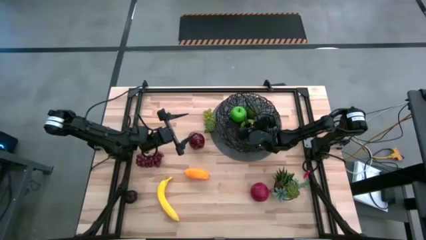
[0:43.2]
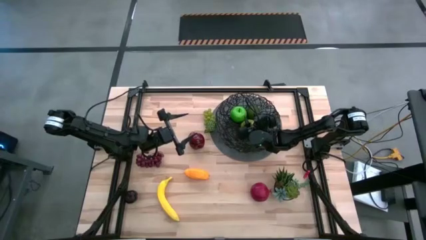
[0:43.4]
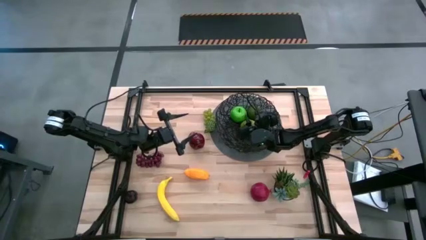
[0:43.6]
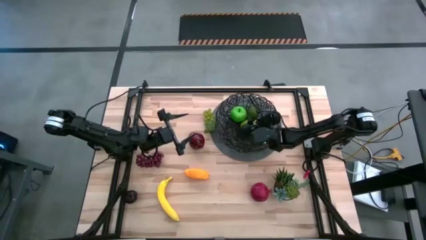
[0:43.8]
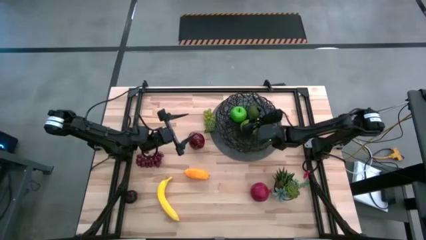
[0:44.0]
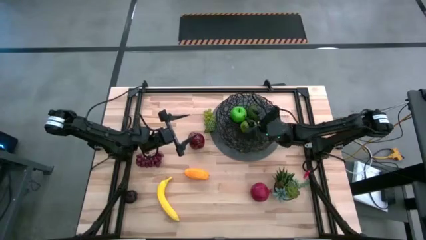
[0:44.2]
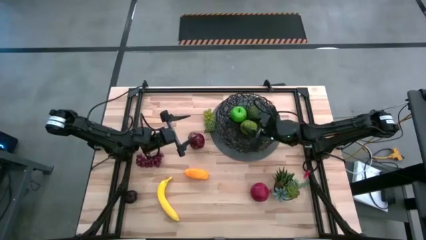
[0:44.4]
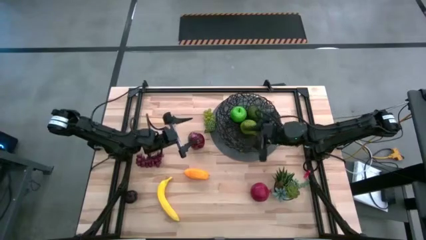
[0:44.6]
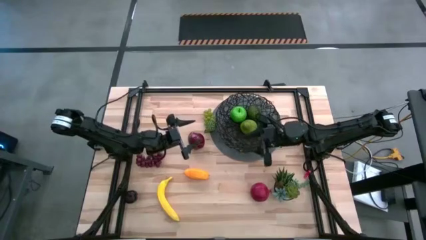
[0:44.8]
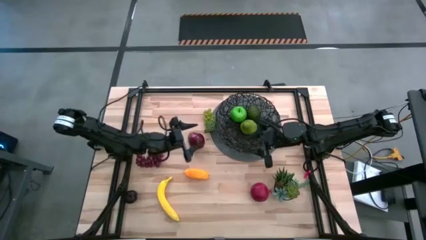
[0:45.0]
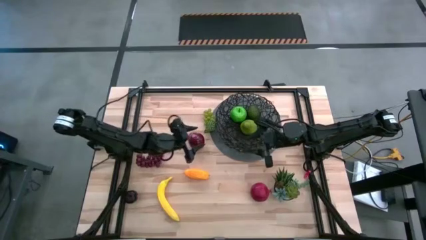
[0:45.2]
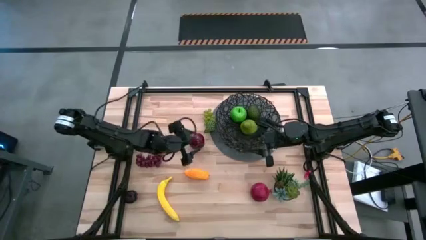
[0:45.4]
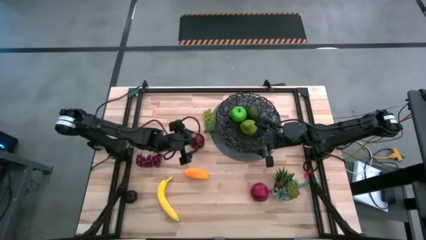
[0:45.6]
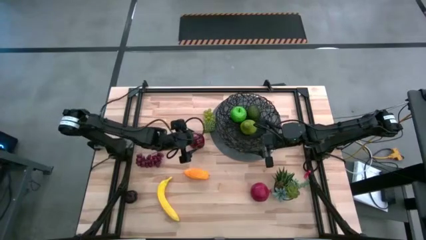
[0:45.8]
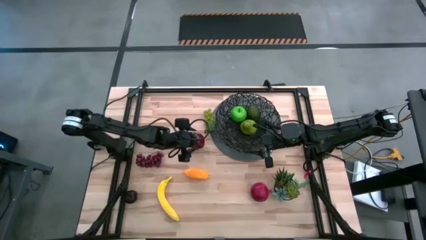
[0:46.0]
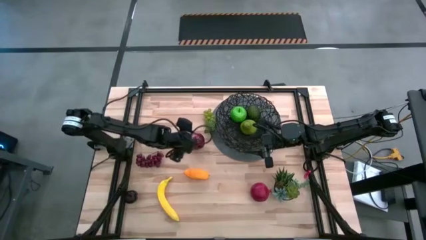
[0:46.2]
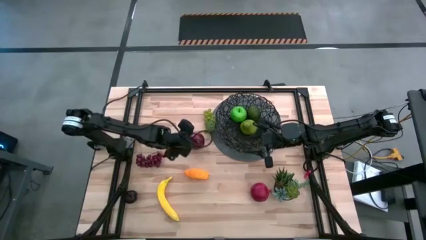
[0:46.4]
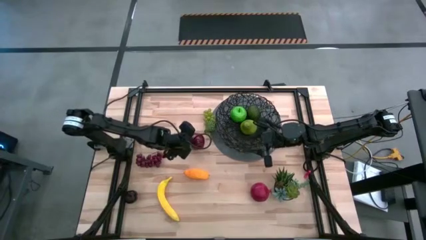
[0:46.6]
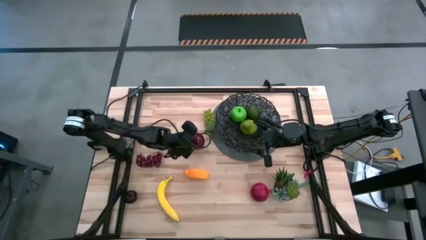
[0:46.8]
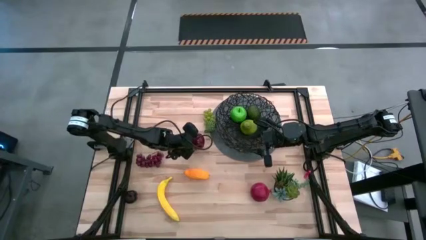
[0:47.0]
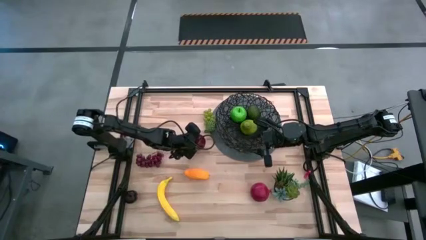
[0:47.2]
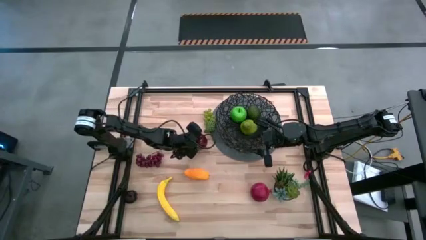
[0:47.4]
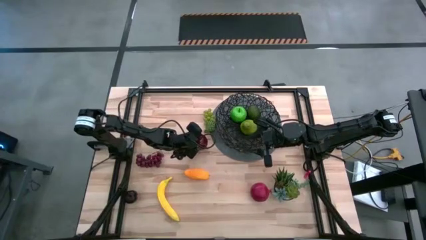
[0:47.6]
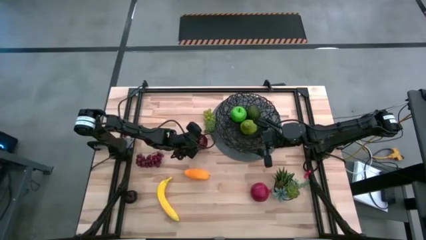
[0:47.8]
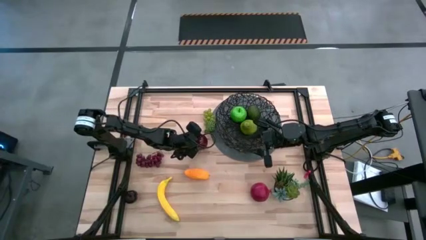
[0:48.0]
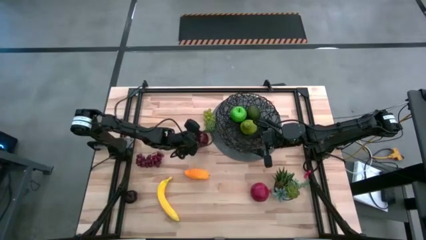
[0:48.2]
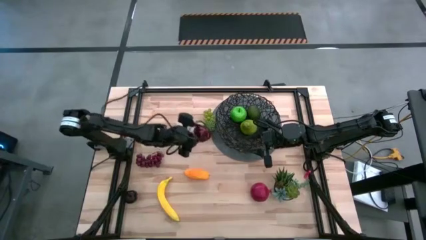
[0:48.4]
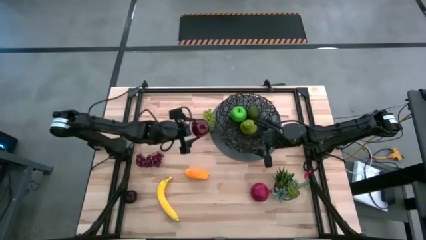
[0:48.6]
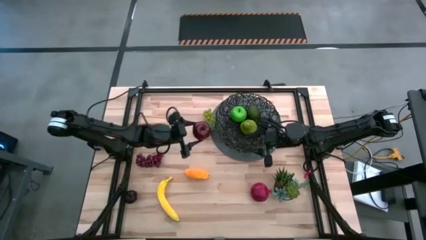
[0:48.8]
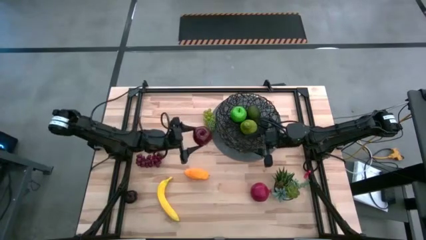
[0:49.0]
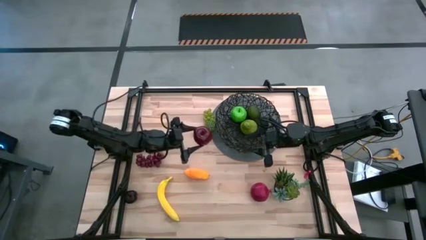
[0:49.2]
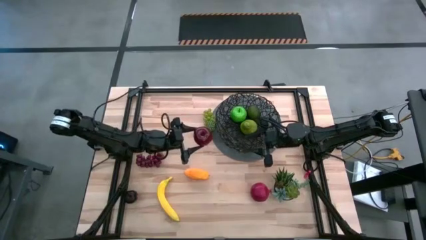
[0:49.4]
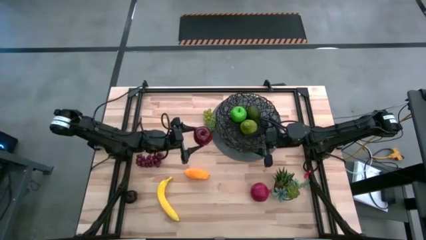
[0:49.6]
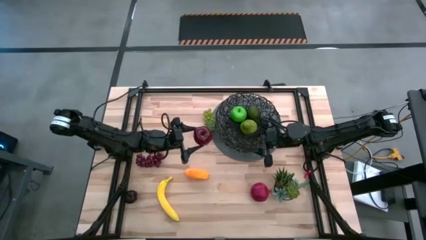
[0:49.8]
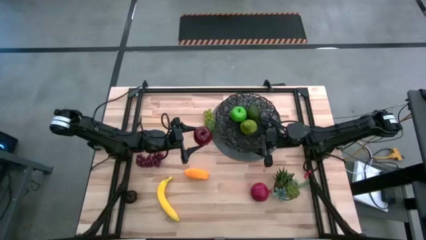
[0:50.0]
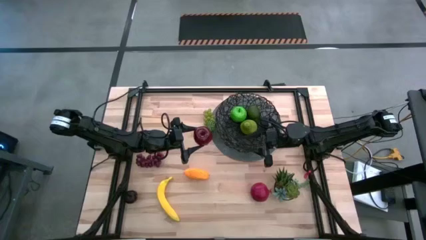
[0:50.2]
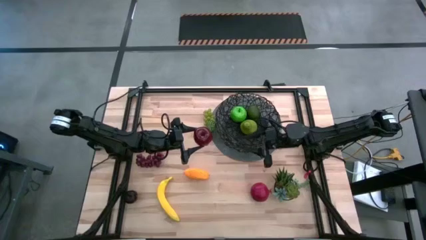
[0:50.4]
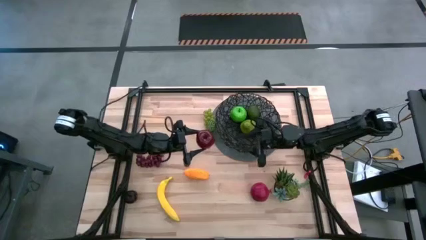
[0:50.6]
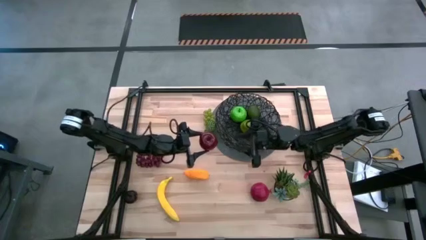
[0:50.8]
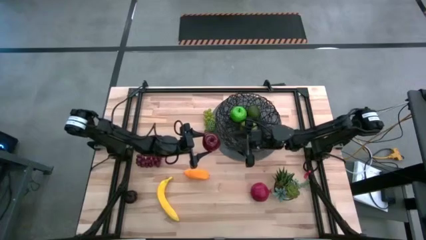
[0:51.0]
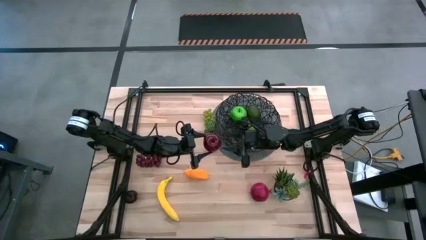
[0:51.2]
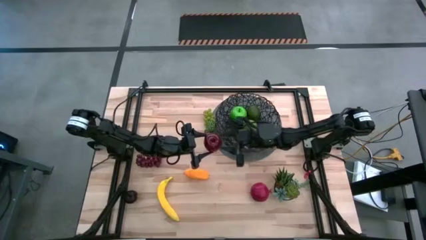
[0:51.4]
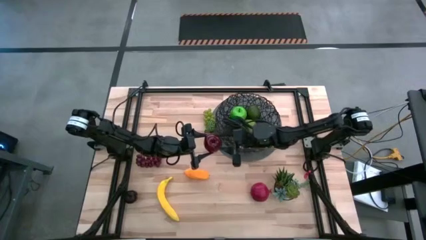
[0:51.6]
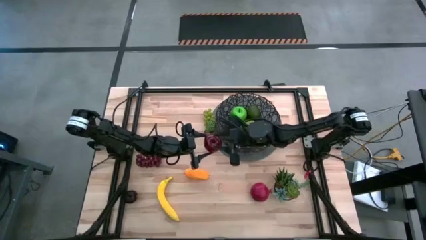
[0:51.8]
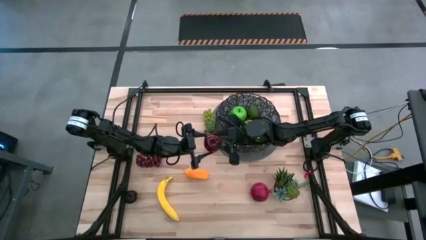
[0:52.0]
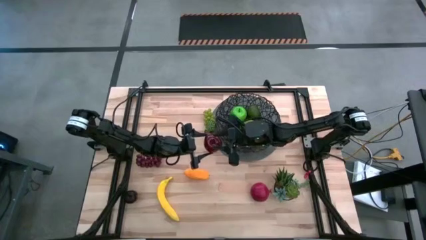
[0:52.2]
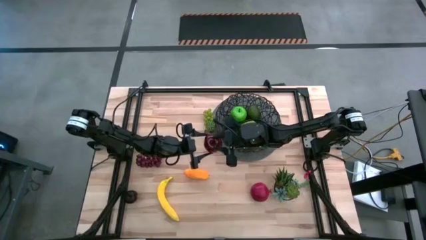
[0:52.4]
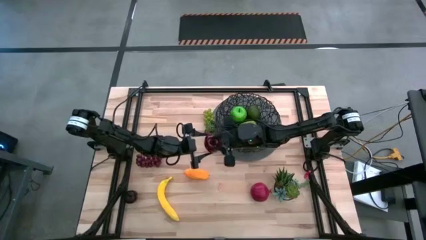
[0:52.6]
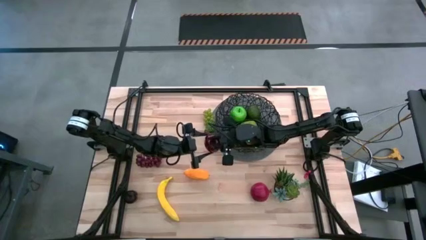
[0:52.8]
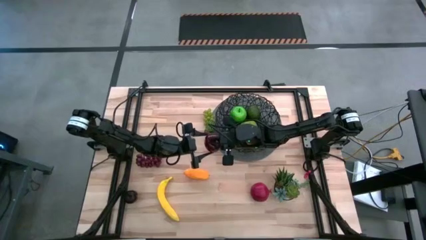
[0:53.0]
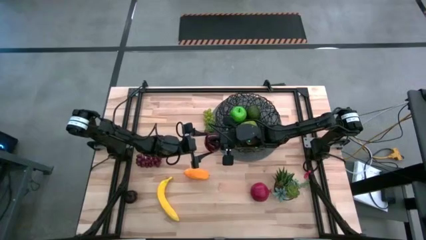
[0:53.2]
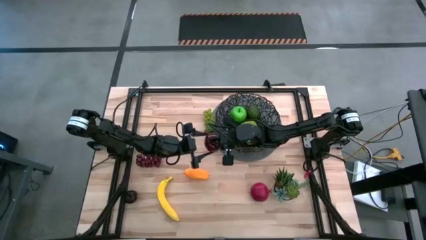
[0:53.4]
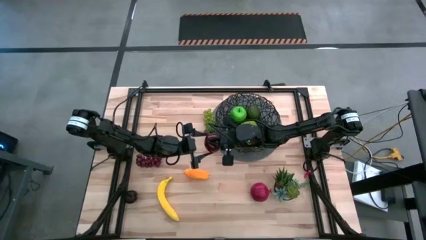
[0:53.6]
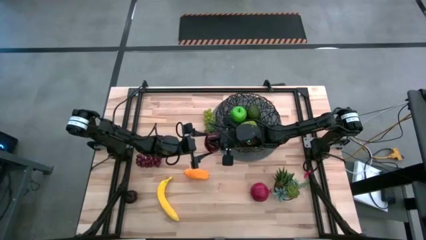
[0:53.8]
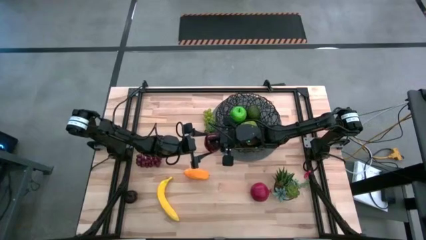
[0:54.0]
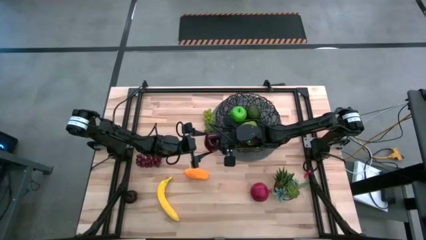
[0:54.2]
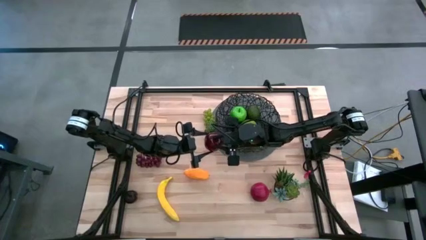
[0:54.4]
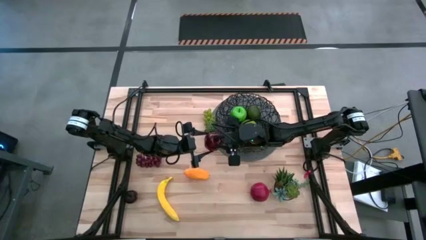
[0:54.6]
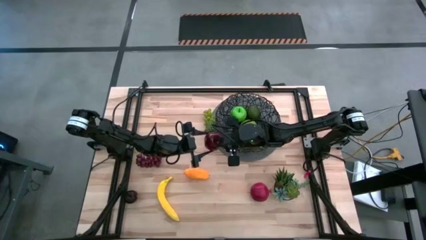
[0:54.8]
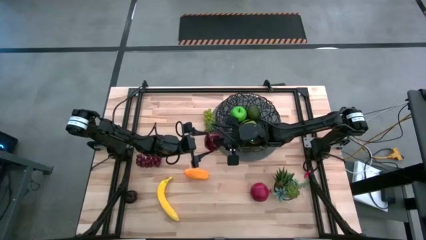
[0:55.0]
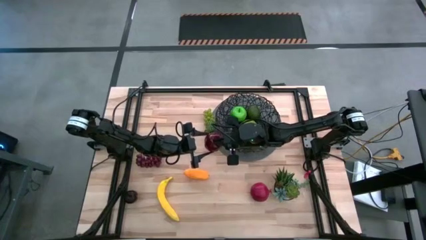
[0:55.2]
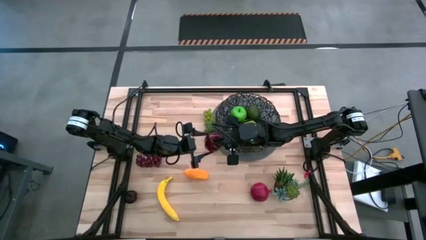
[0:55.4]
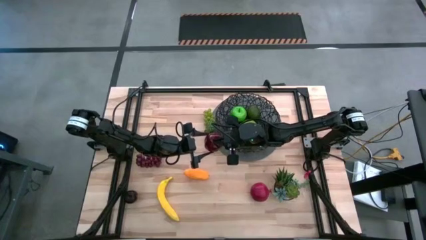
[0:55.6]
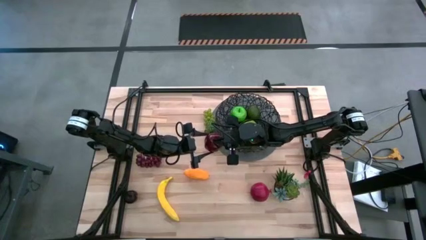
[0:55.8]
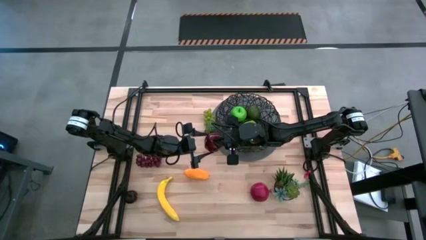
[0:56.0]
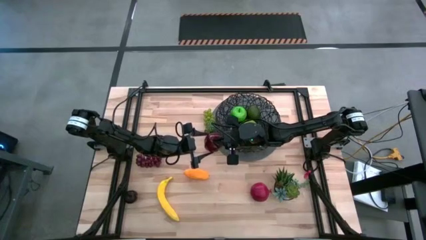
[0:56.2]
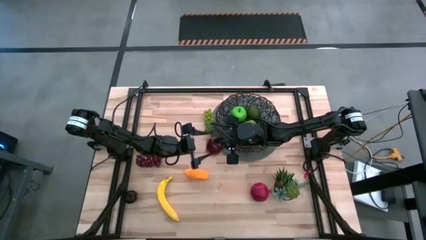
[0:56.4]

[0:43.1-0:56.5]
Task: Build produce basket
Put the red apple into the wire basket
